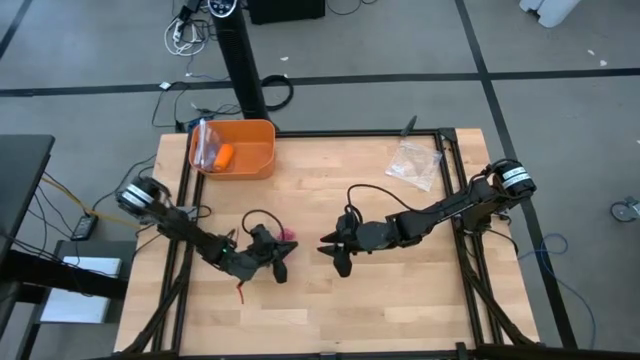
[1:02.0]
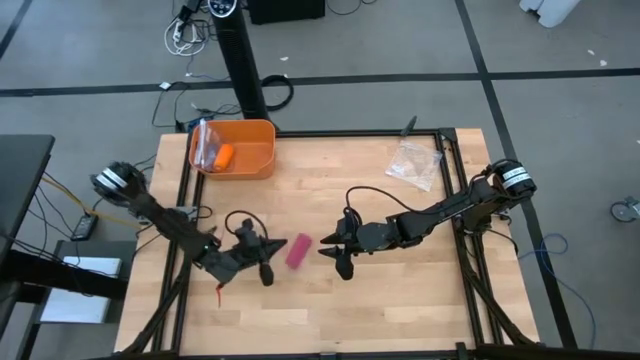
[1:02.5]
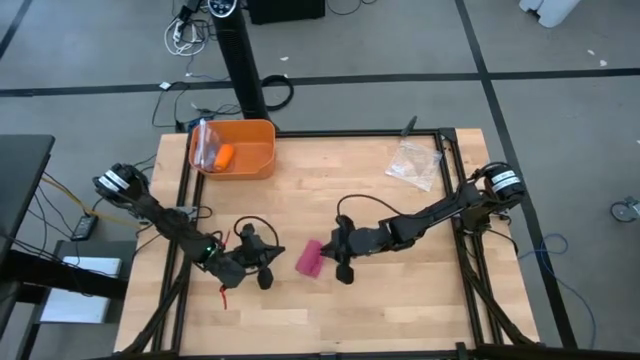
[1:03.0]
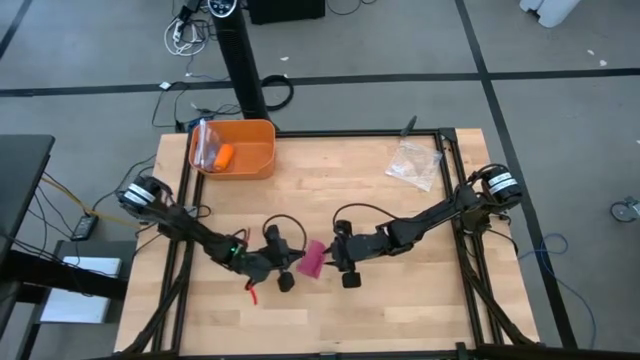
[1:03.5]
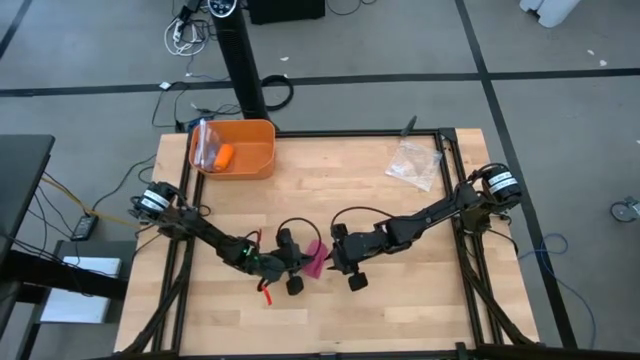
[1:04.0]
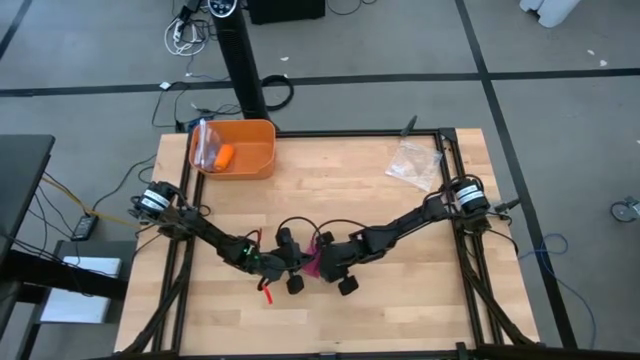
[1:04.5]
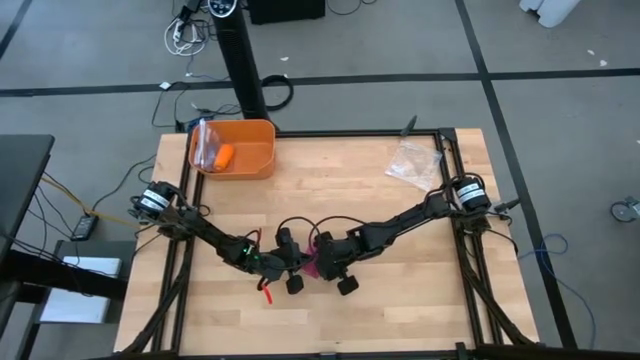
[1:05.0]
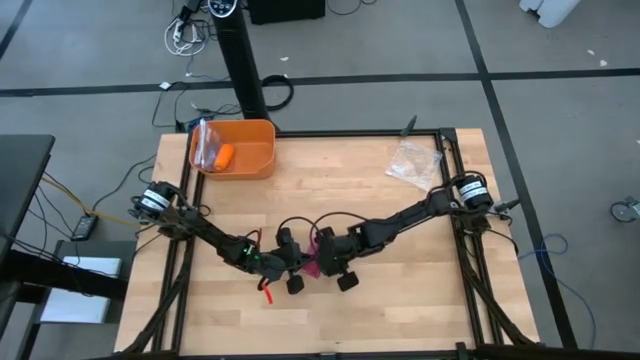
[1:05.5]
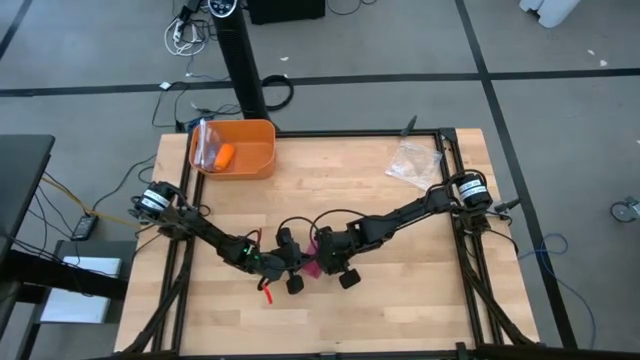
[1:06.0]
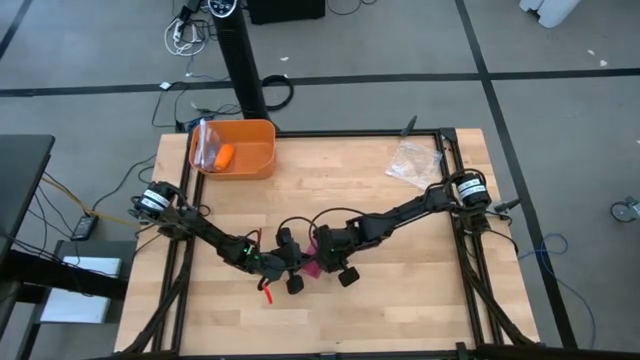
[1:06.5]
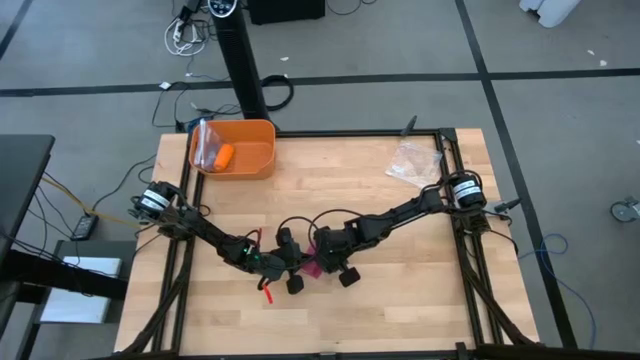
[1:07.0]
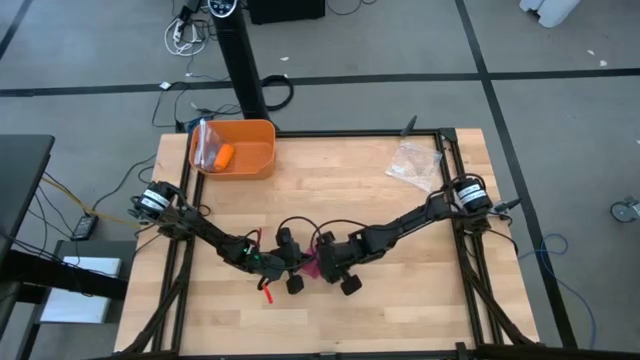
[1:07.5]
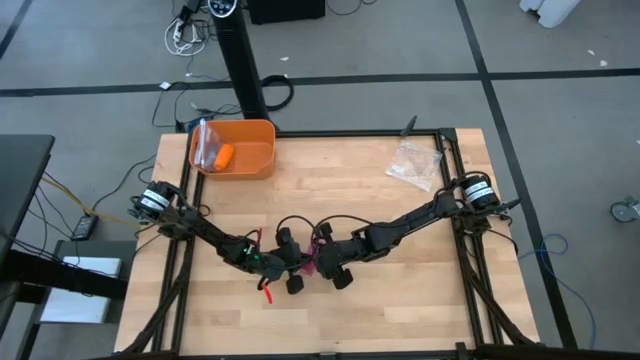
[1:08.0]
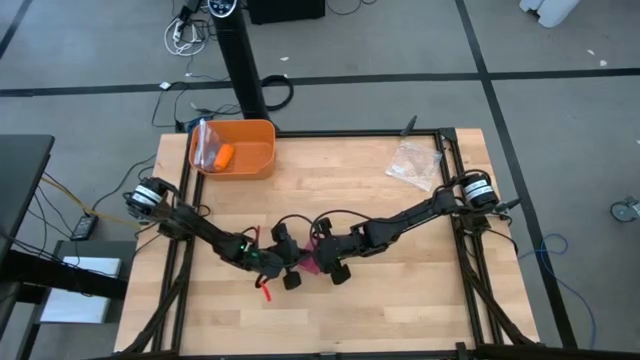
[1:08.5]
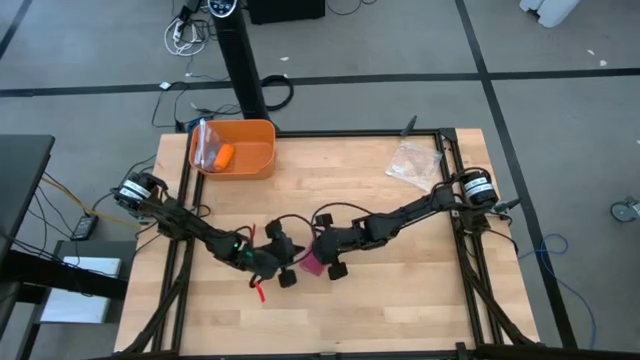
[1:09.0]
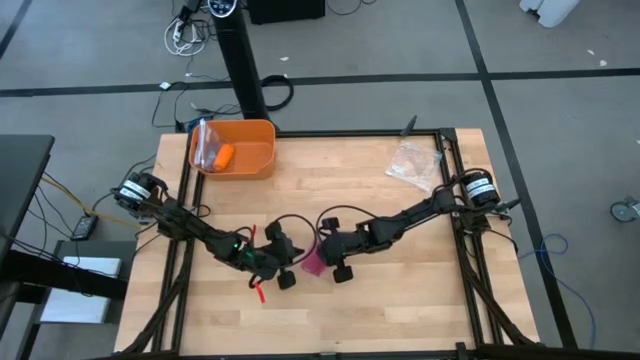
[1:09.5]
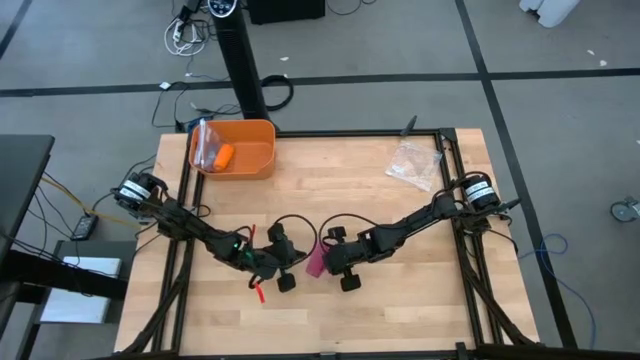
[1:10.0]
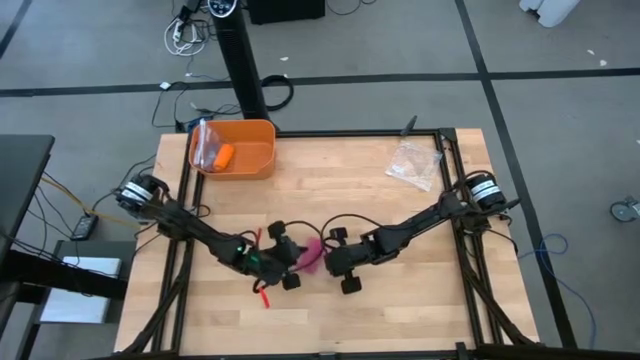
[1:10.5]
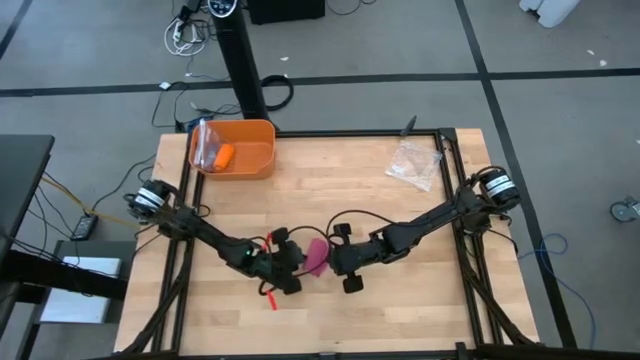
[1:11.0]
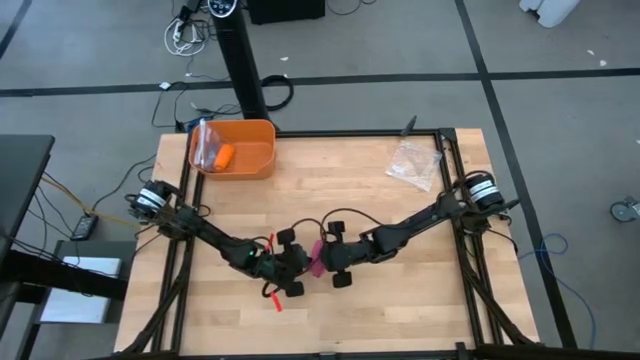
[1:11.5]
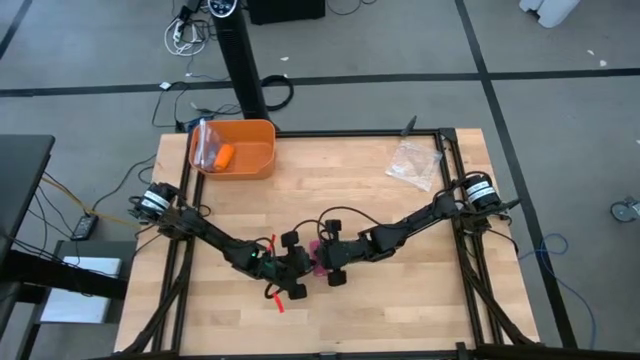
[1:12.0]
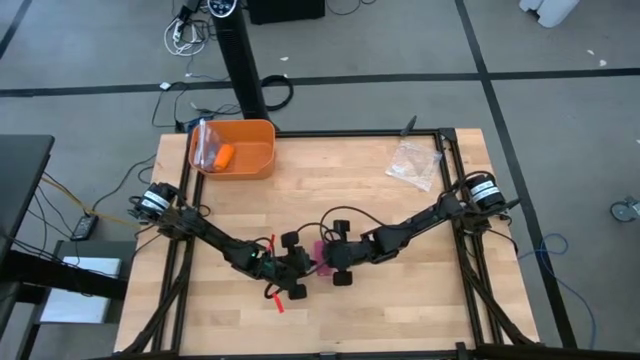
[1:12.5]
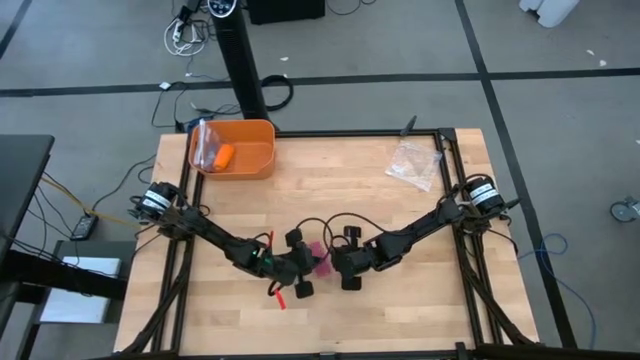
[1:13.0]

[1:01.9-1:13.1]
Task: Roll bandage
Roll the pink bandage

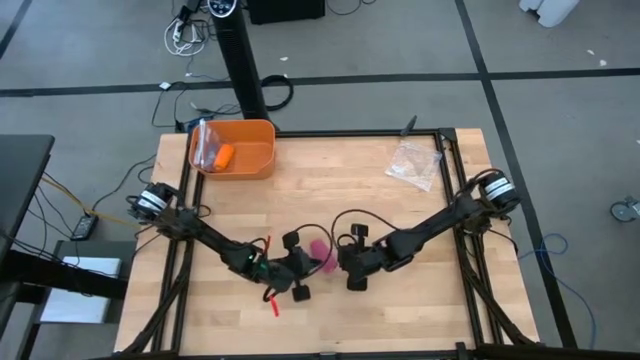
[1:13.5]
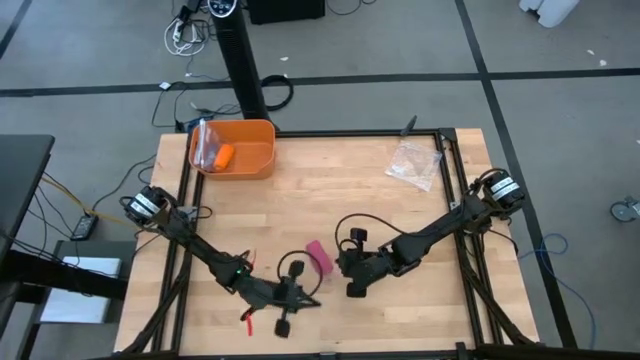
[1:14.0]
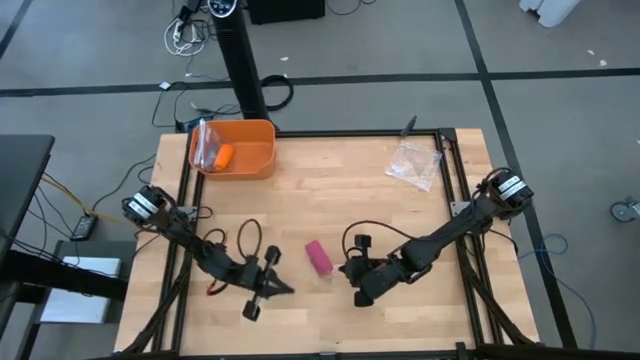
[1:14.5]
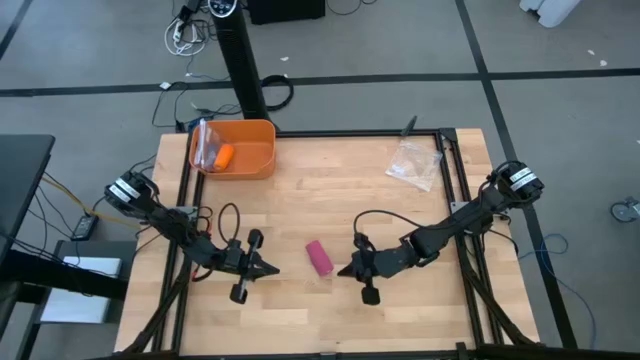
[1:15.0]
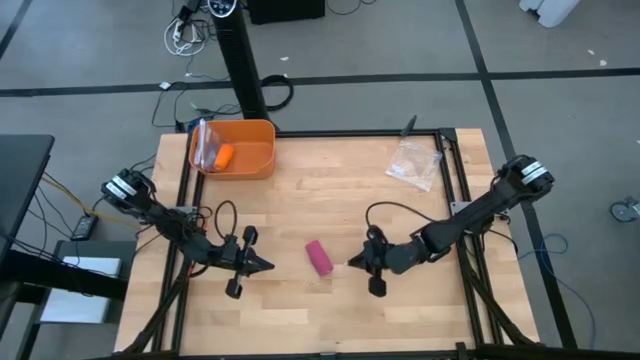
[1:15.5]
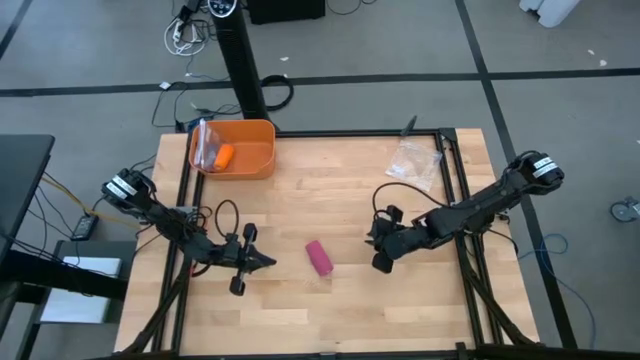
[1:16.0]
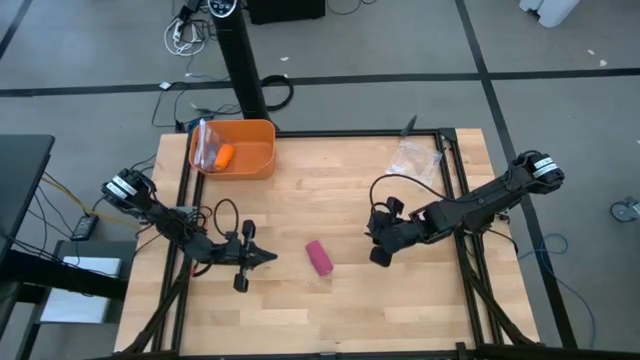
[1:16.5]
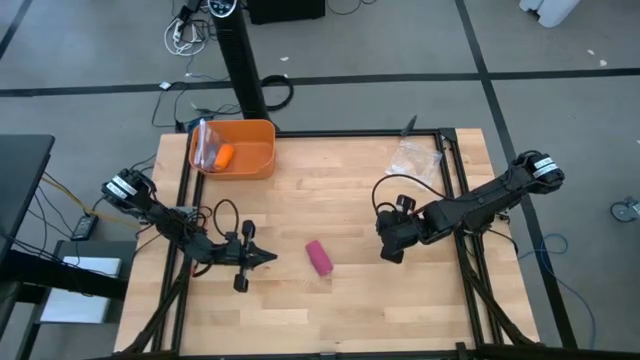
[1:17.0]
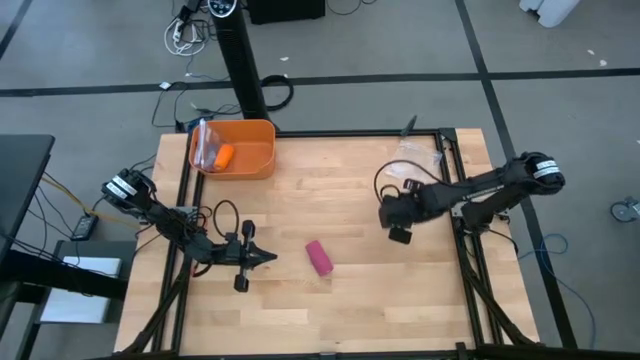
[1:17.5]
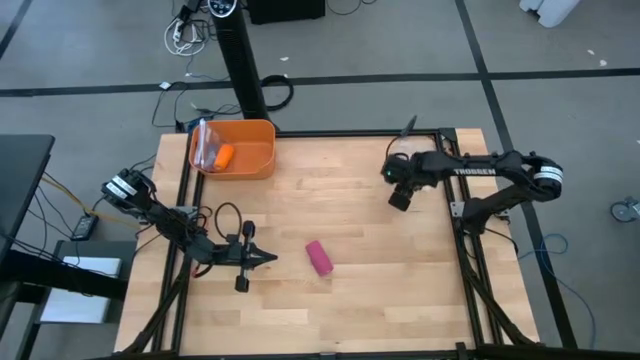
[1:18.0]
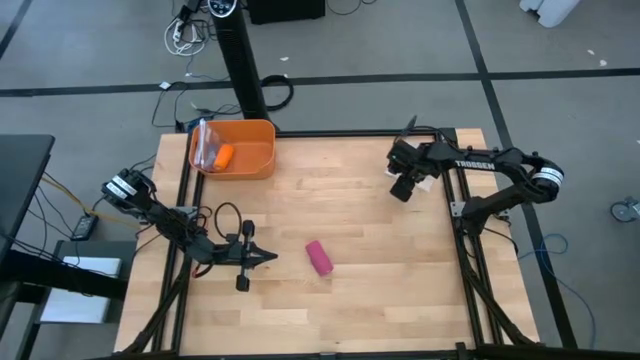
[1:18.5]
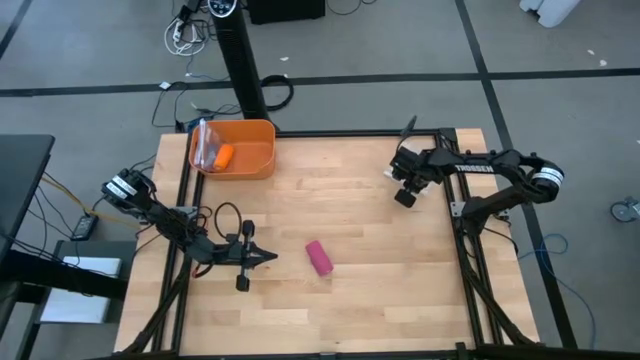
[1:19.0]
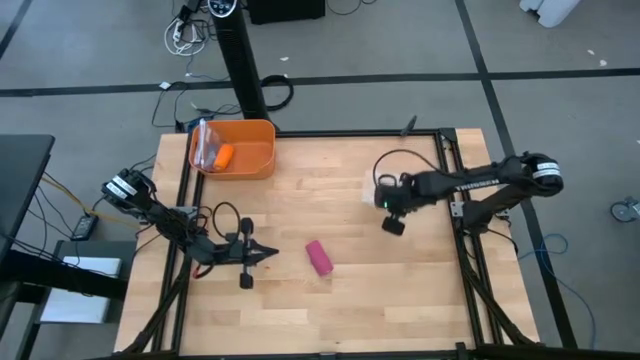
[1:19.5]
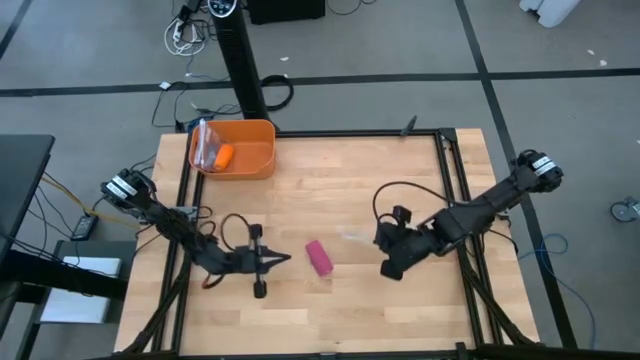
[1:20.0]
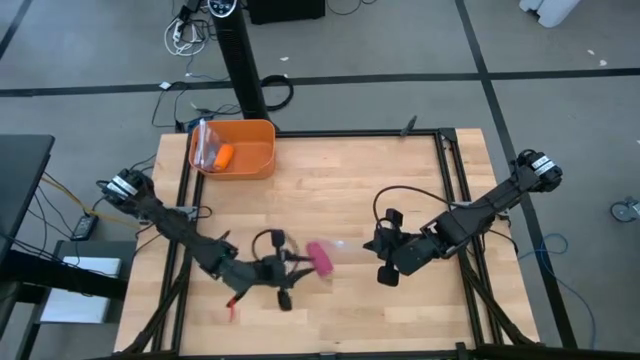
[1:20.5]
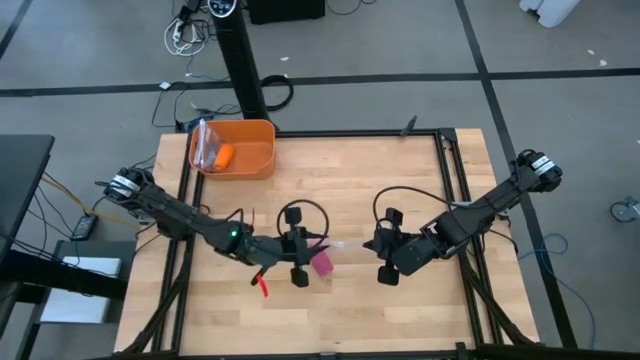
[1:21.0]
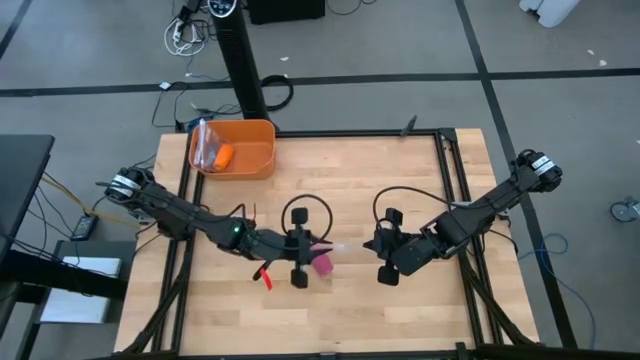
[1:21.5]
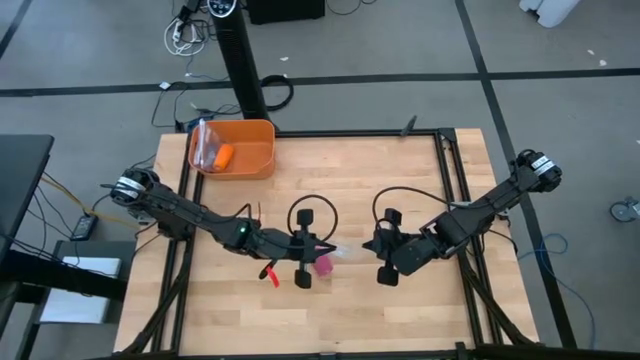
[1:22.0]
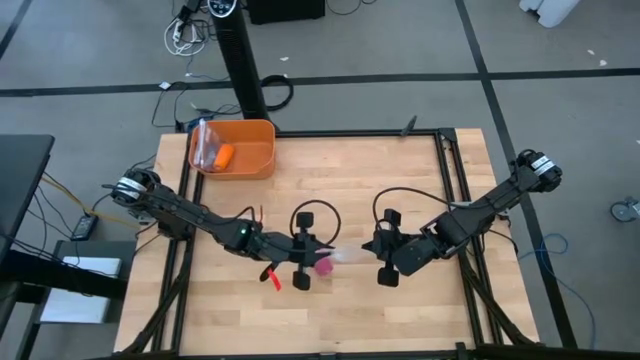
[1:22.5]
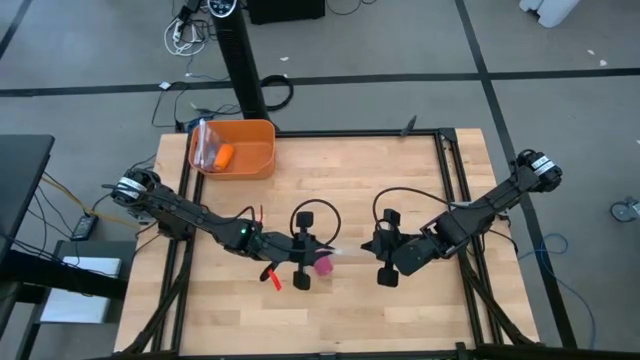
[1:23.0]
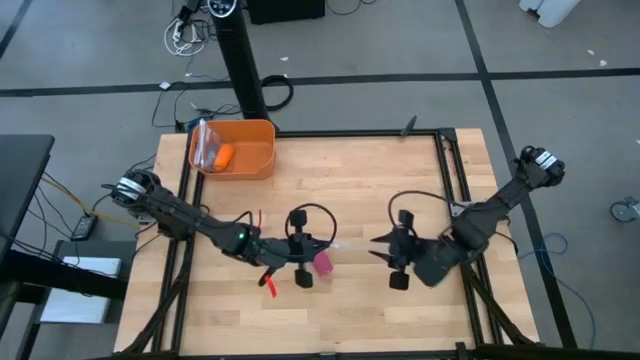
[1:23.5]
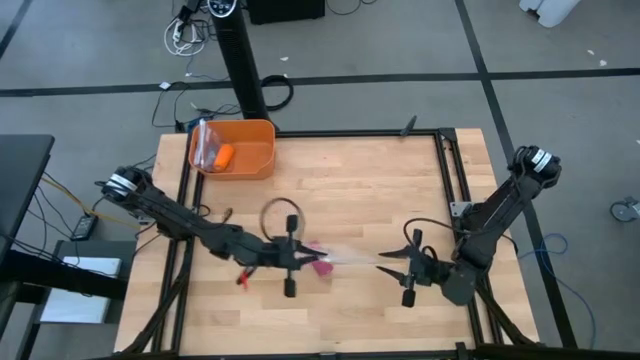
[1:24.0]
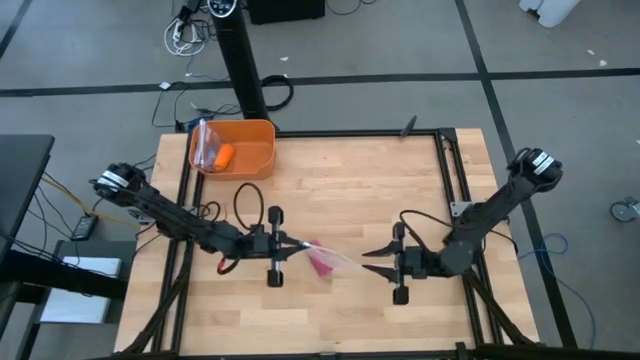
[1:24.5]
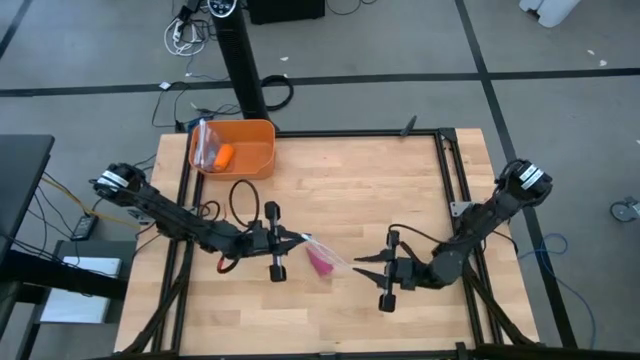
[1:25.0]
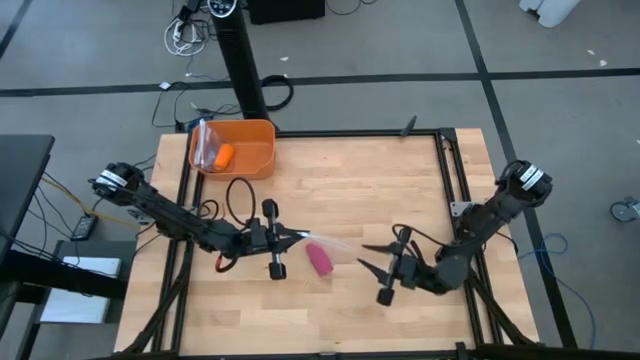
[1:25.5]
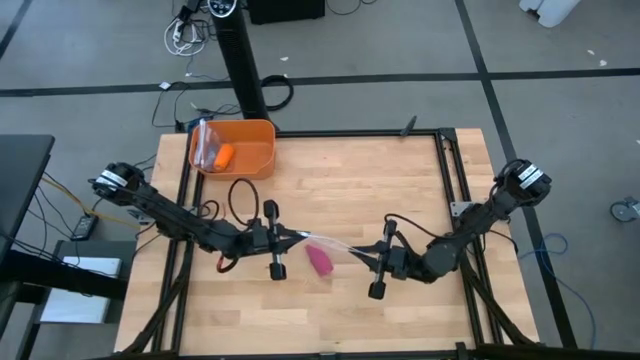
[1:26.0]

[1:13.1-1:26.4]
Open the transparent zip bag
